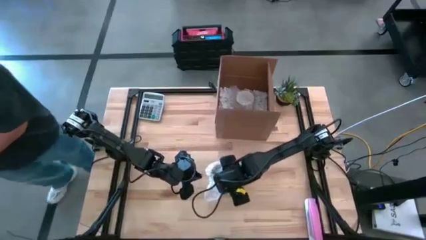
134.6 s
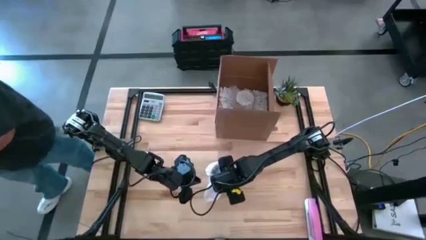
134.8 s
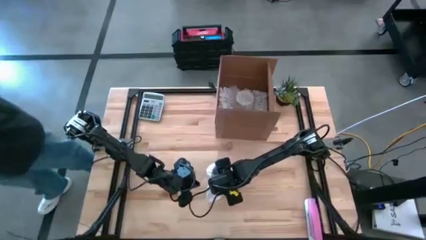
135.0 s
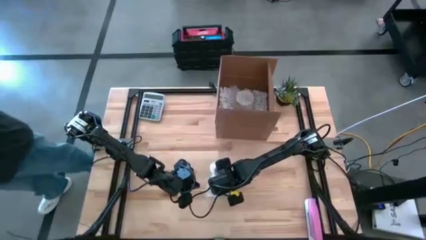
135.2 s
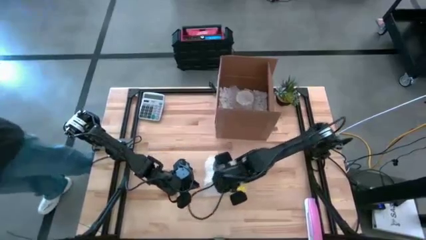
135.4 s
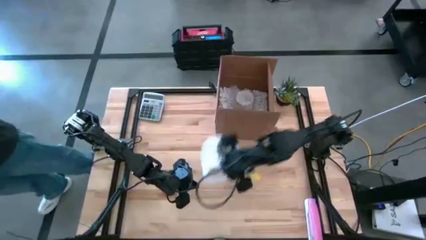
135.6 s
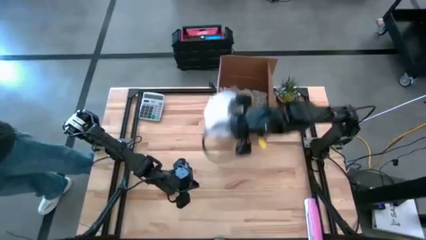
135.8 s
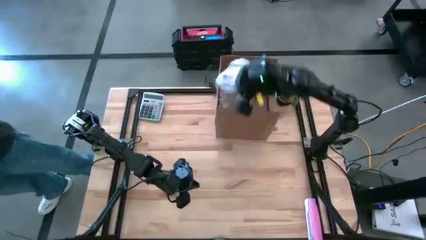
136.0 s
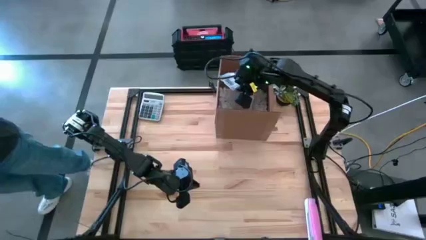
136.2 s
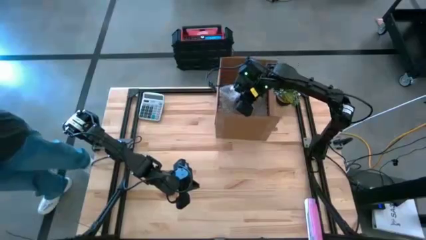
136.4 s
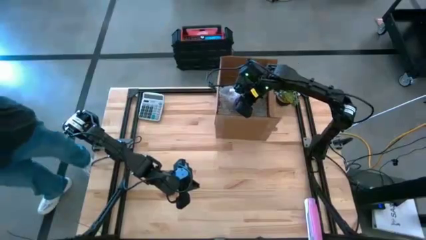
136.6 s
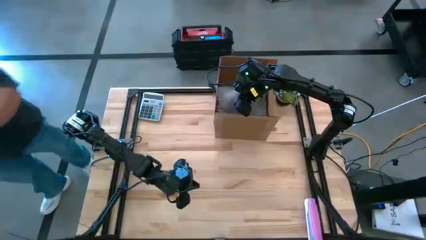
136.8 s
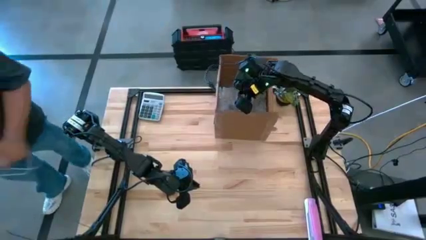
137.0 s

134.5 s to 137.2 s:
Task: wrap mug
Put the wrapped purple mug into the cardboard box

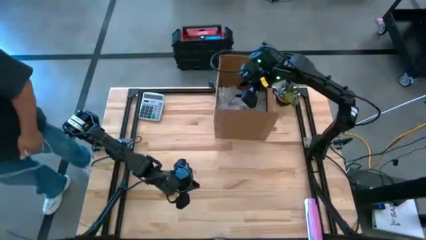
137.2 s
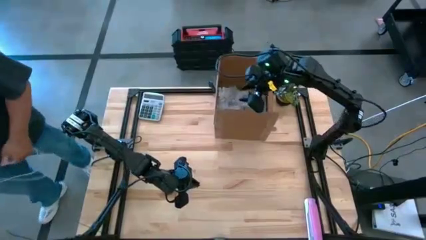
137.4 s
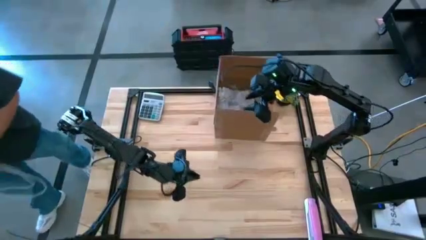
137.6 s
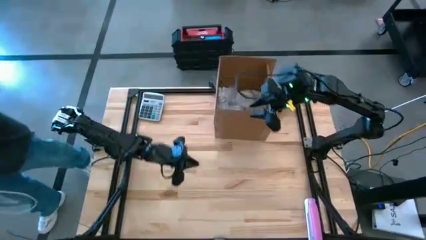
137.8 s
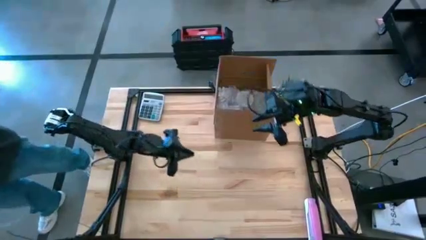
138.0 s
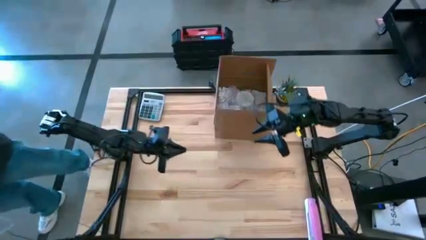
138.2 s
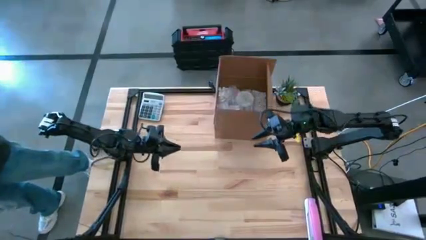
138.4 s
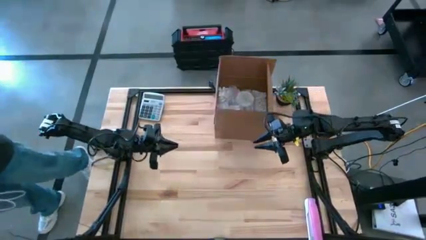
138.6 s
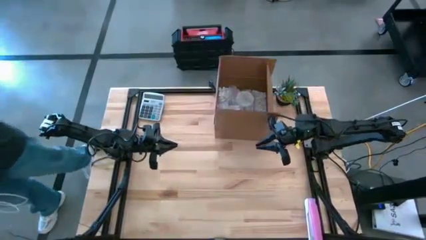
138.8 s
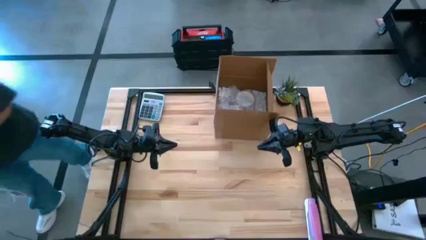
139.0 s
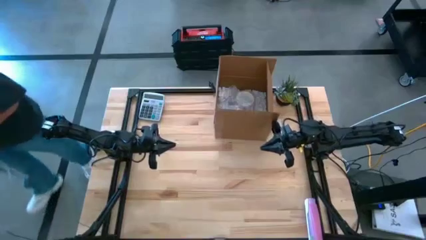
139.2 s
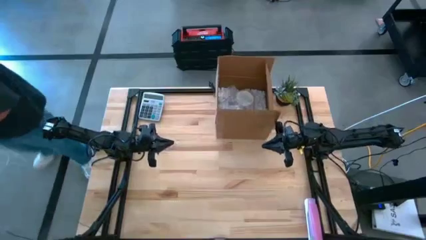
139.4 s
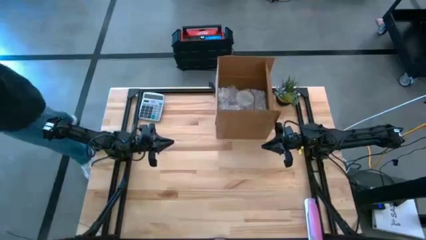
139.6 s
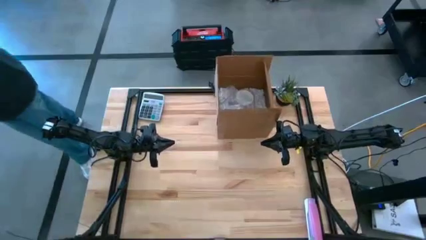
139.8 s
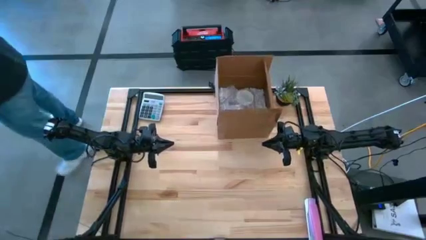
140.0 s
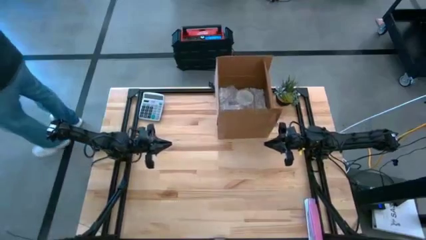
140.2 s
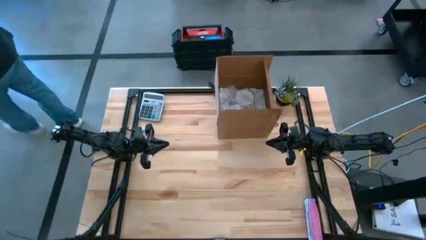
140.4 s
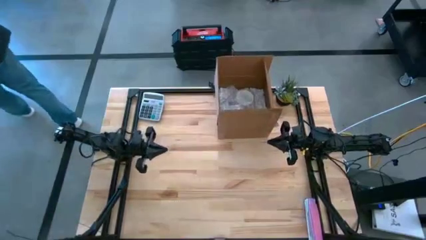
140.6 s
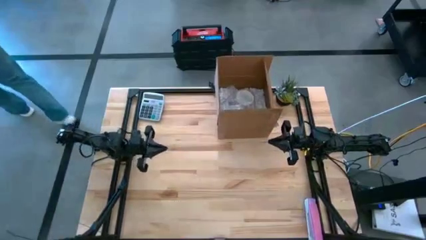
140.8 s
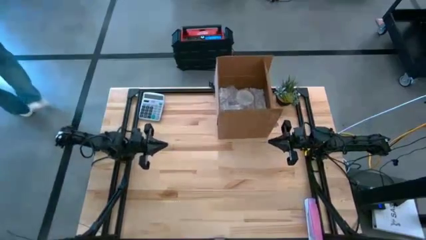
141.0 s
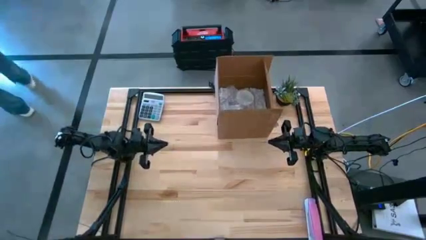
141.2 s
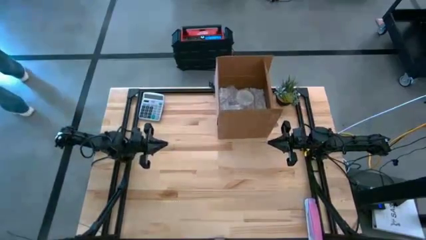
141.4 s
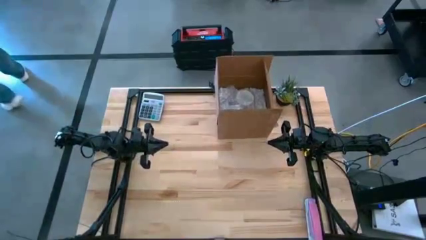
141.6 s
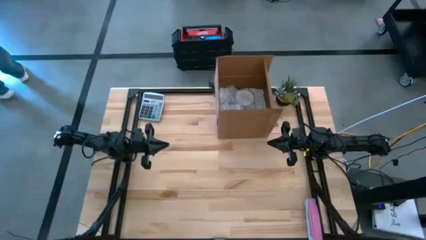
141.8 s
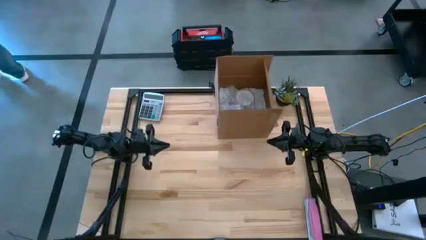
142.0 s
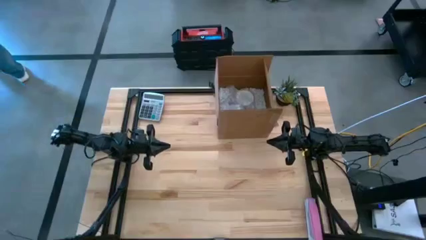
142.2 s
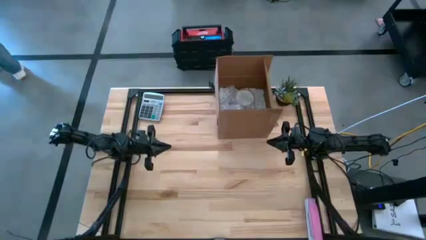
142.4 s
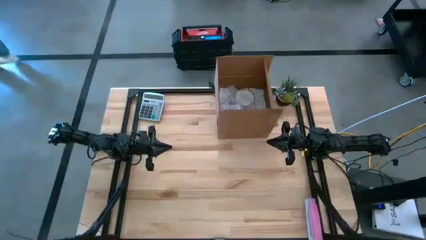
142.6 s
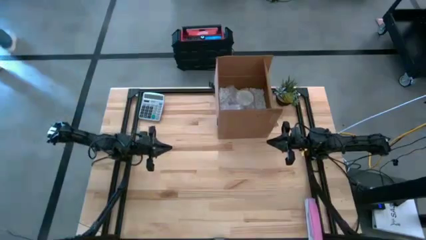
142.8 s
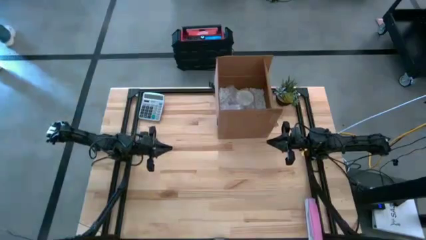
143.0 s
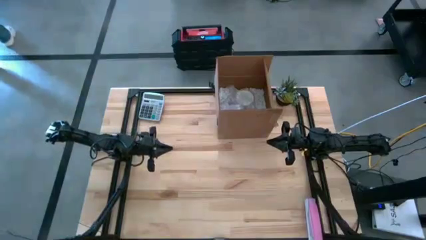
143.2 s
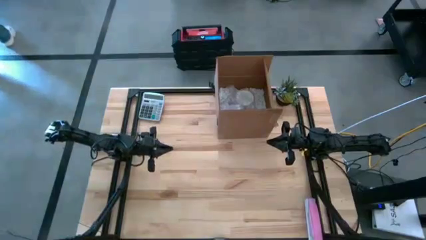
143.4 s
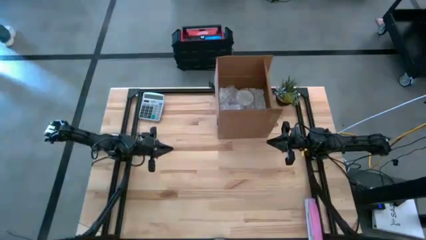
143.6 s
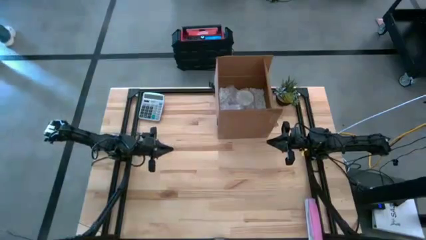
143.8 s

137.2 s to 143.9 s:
Return to Home Position

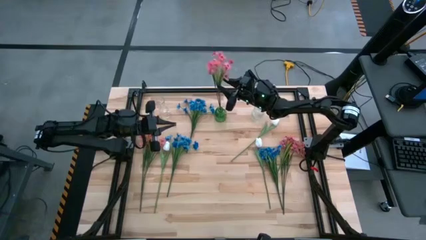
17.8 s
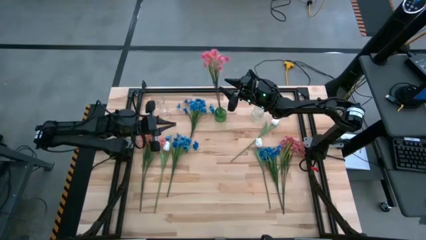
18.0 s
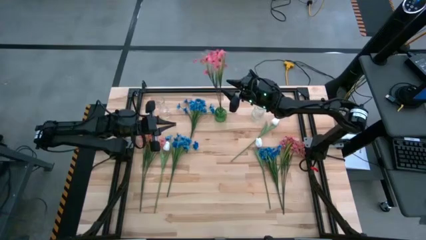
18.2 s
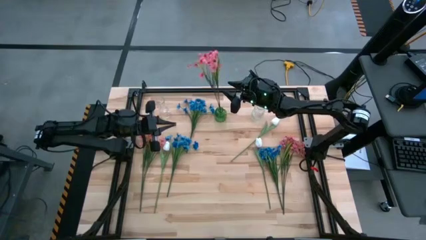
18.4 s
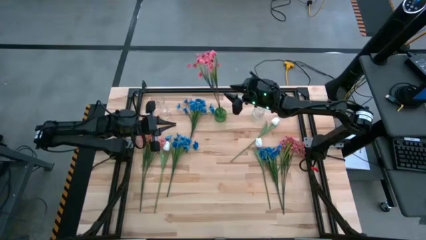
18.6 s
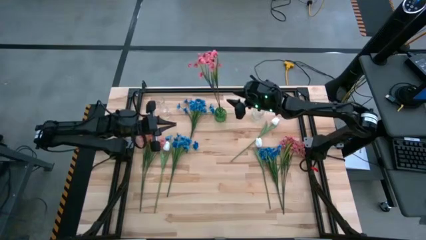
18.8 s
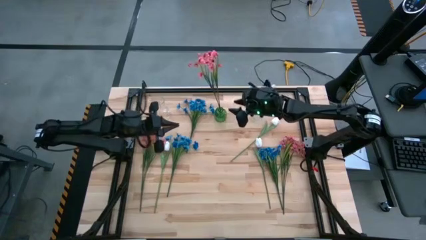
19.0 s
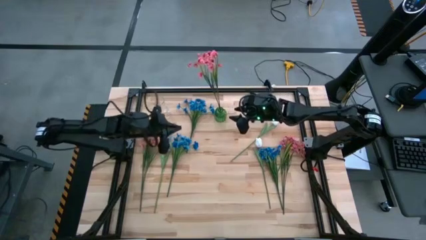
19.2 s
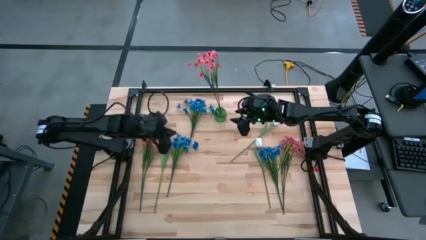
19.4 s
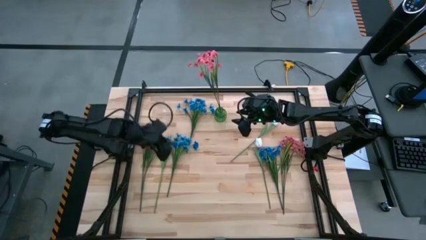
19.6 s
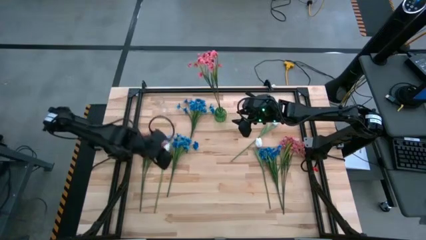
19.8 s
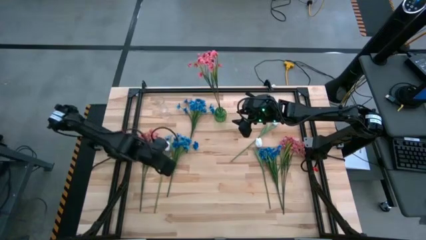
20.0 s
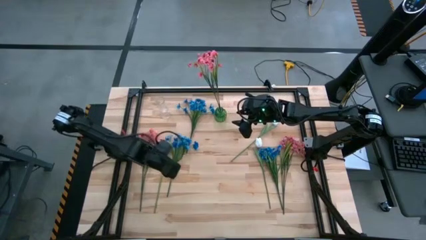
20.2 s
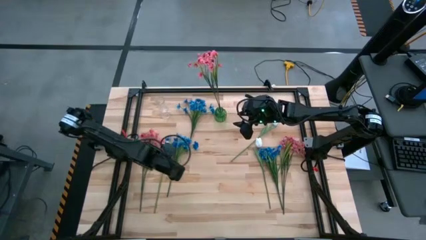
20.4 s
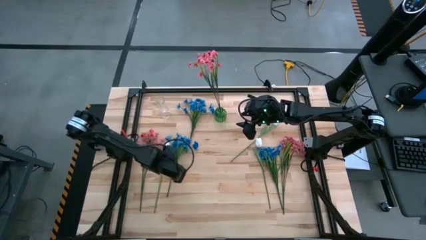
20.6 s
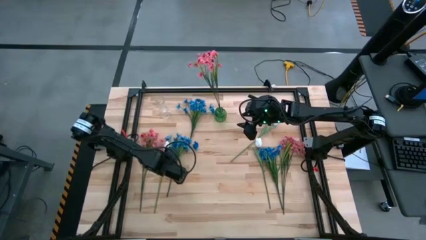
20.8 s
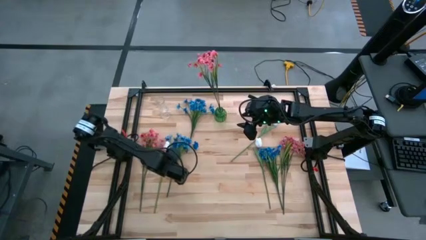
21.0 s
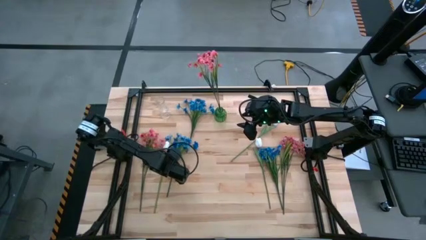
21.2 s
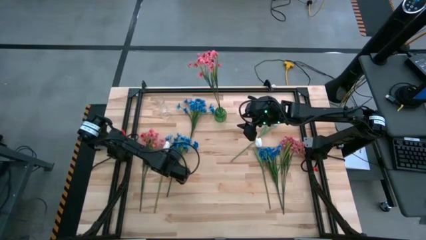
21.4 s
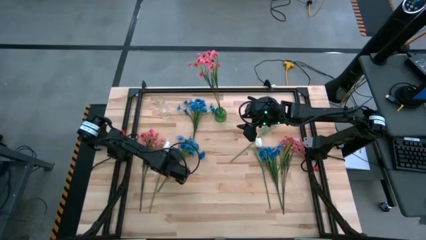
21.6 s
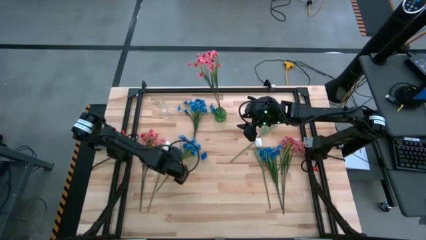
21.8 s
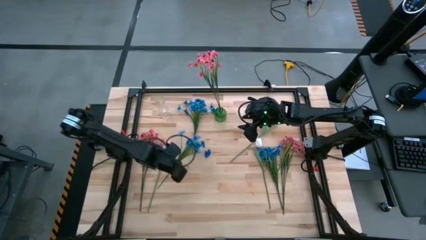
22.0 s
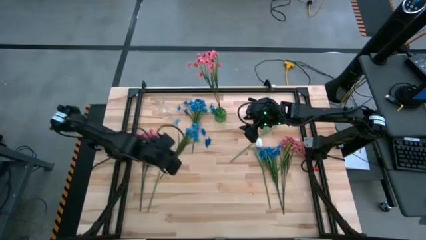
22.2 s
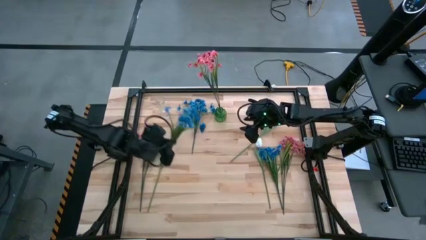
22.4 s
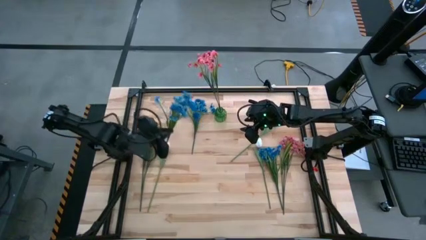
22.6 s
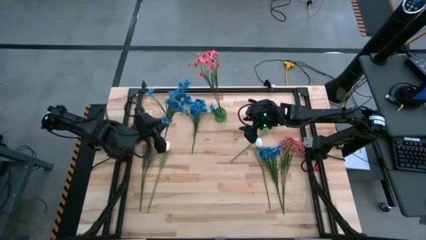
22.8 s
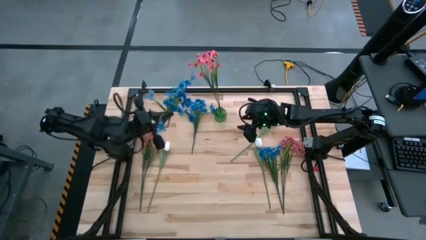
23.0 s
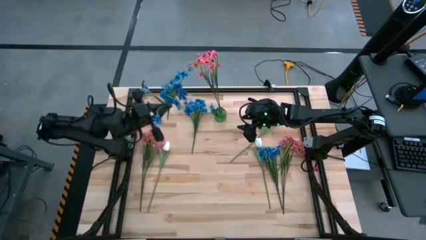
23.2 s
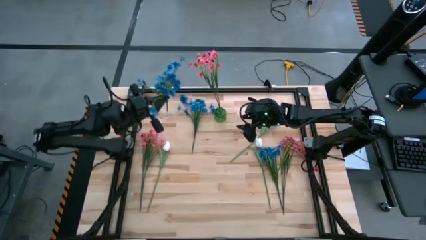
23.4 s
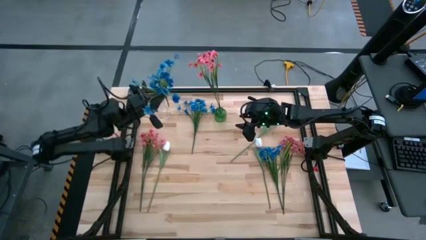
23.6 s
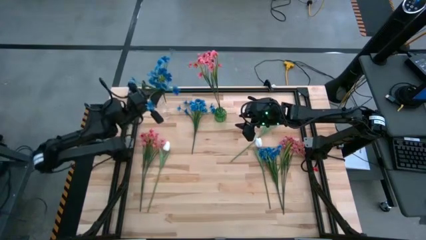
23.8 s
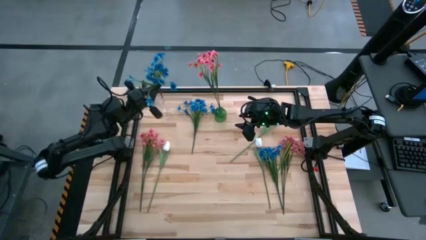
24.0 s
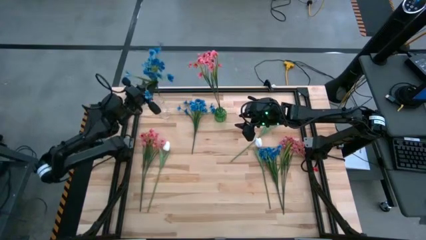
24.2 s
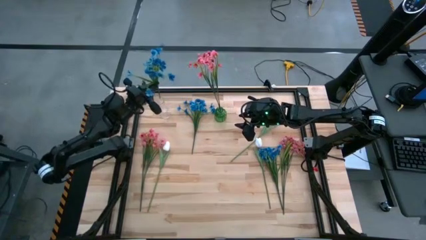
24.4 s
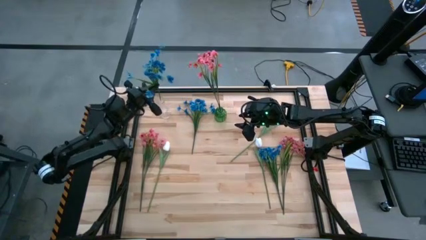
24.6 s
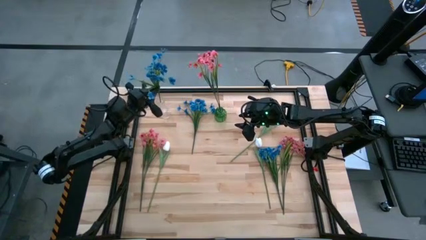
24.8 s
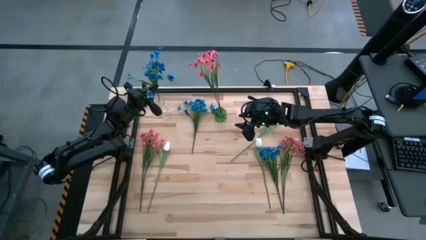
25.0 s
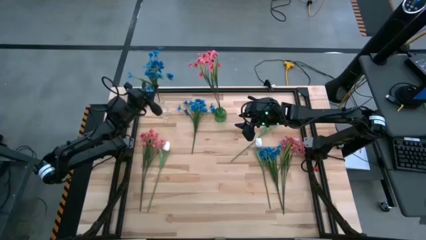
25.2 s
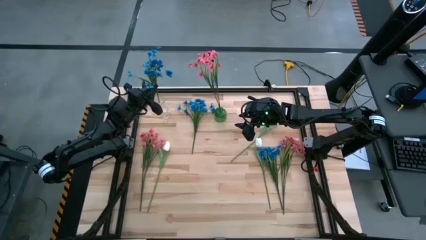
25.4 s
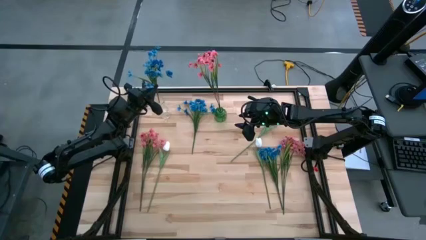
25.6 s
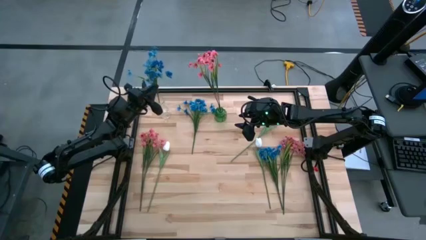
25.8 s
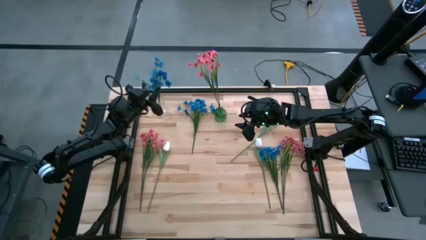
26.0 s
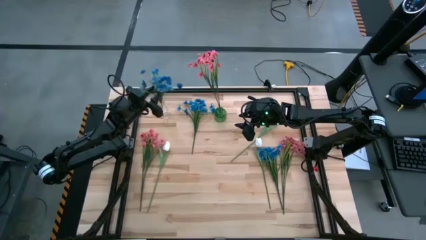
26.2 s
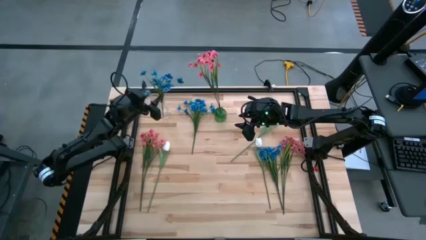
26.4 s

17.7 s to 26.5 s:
Task: Sort flowers into vase by color
Put the bottom left blue flowers into the left transparent vase
